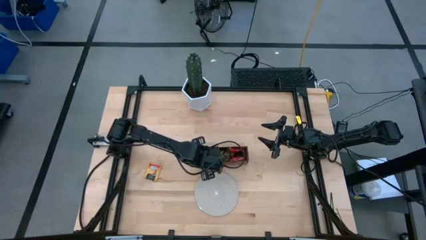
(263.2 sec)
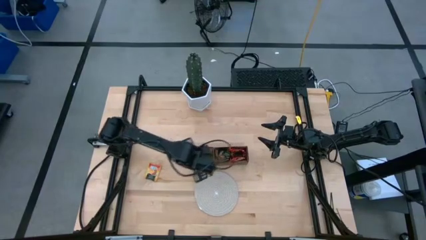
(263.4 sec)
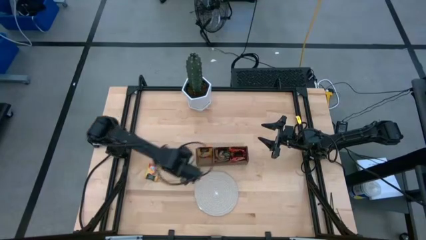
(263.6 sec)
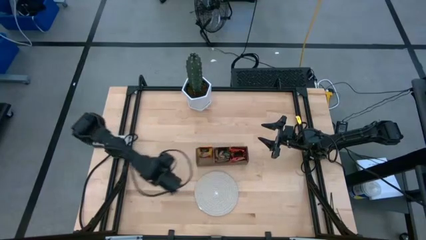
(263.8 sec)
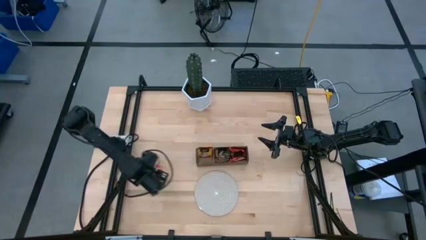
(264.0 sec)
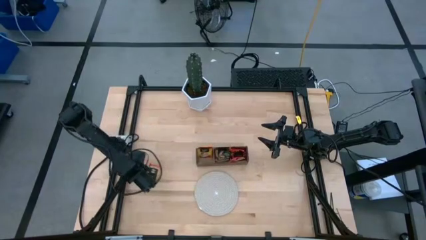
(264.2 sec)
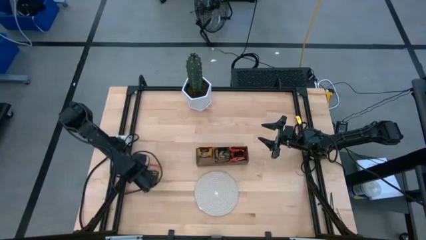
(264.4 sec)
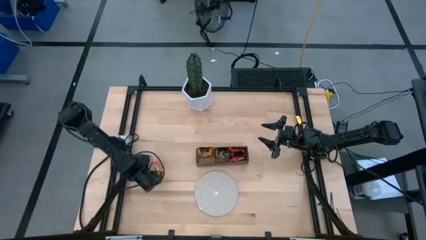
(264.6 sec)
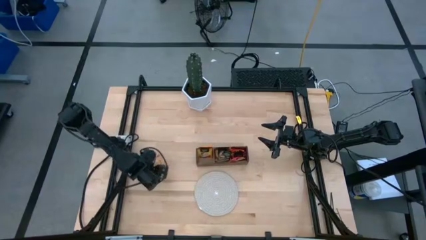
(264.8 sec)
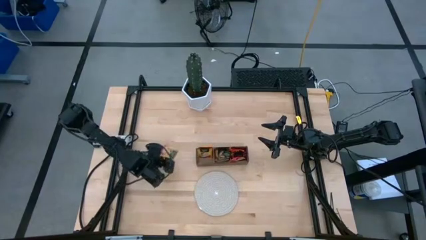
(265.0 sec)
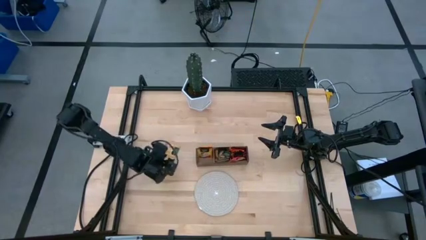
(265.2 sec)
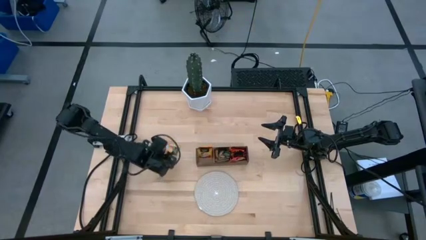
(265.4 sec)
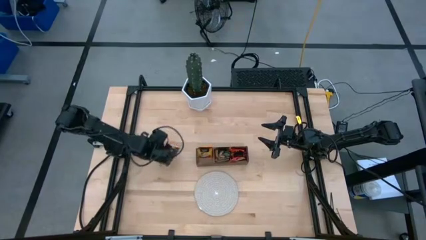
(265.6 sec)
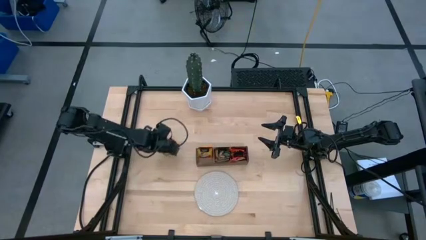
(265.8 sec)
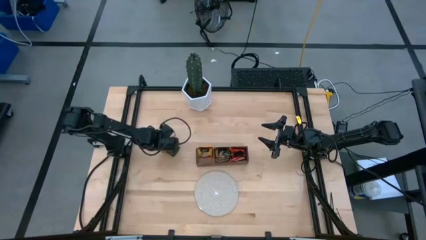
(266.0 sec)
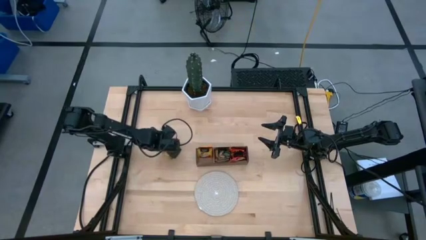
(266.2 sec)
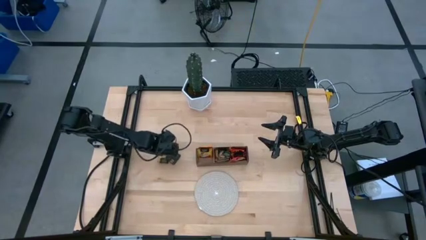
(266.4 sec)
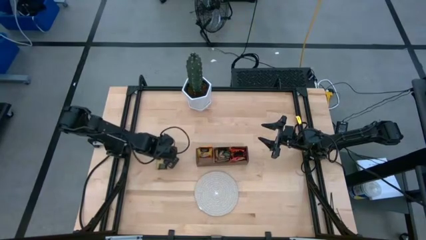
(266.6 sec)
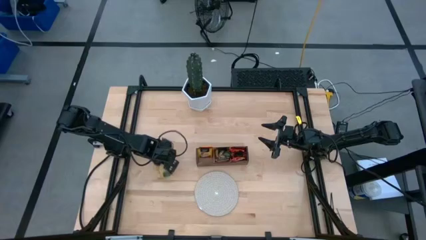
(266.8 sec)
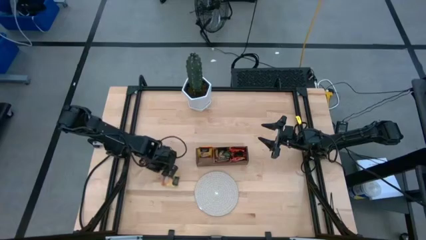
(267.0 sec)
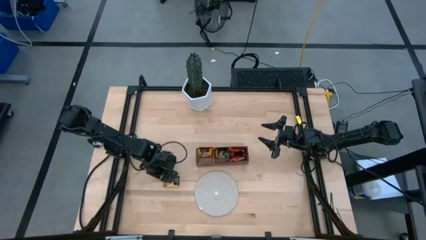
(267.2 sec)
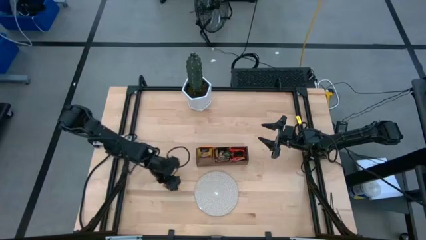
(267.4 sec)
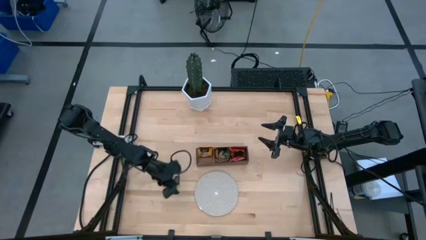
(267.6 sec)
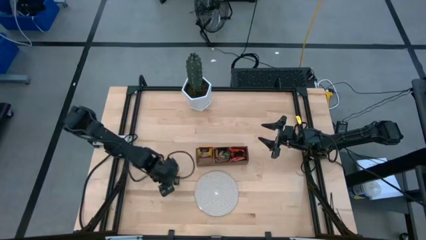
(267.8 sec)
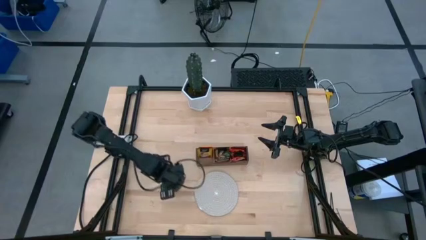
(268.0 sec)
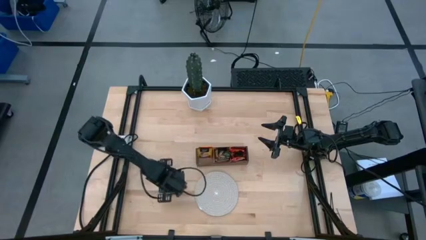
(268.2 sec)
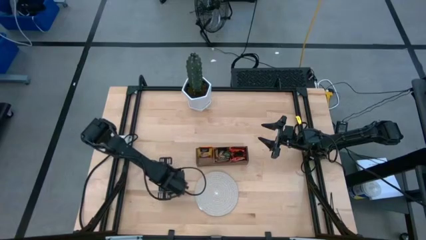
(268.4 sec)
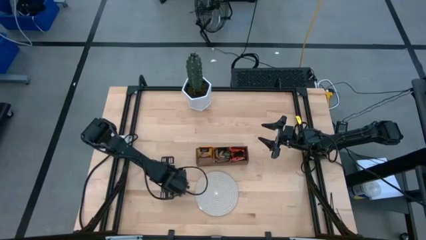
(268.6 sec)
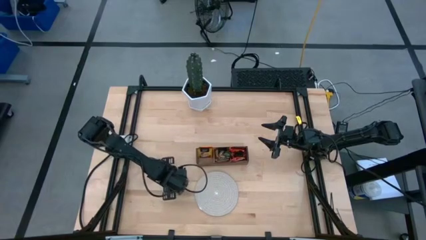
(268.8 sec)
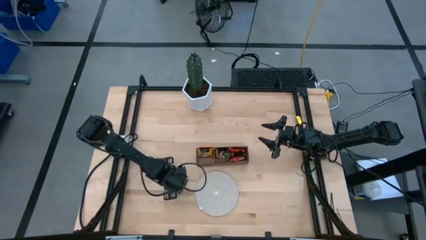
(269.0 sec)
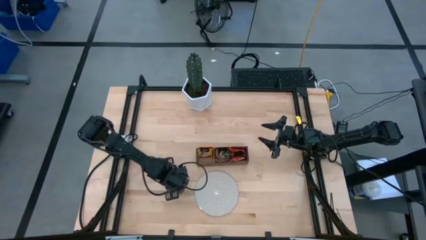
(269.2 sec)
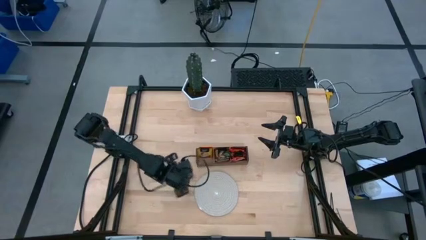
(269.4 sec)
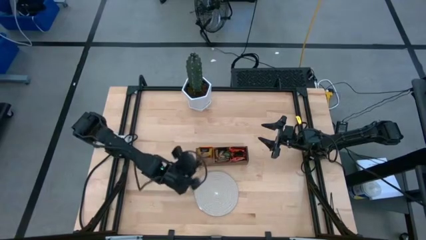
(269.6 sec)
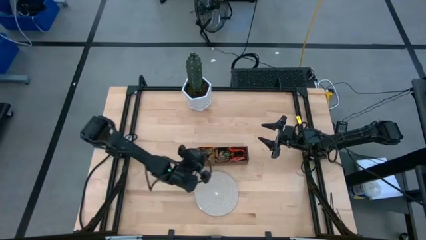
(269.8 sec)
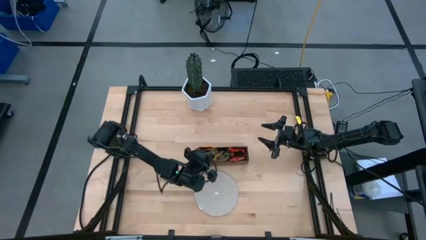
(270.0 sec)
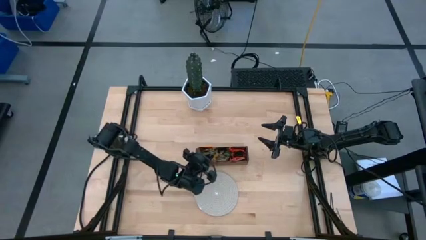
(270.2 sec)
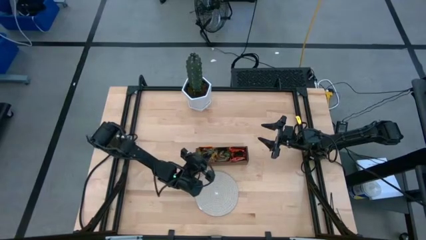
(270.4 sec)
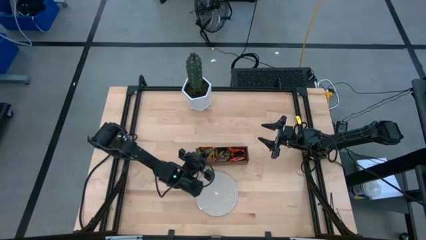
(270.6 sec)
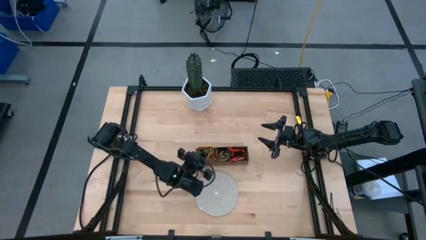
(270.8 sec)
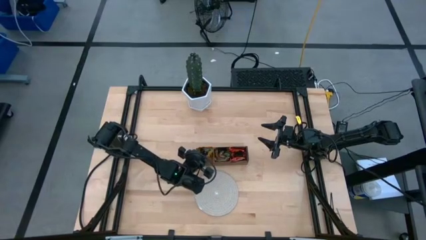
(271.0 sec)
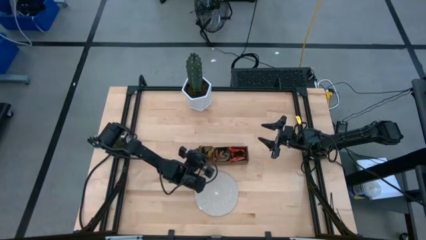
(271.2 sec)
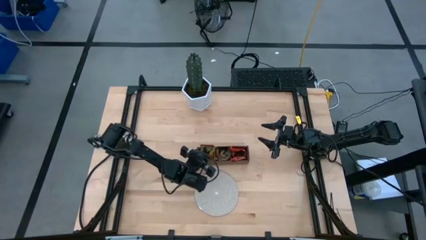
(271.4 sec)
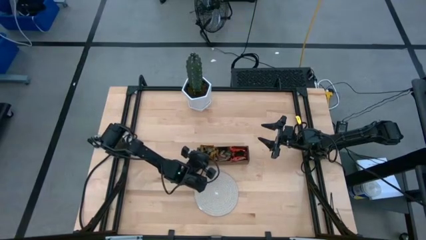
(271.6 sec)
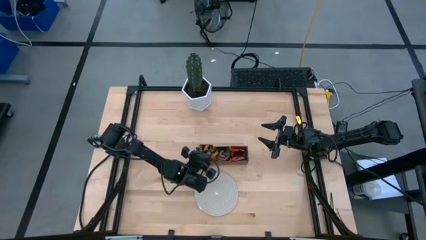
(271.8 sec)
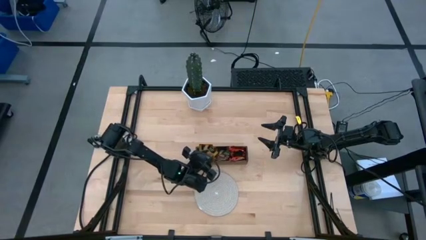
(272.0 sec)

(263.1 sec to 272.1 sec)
Task: Pick & Place Tea
Put the yellow tea bag into the left section of the wooden organizer

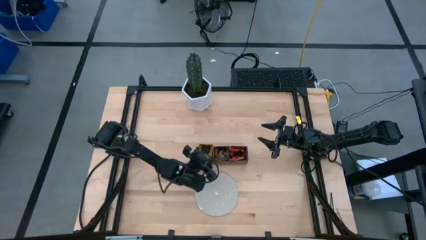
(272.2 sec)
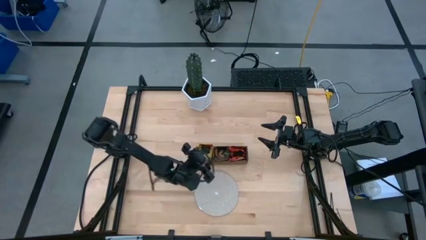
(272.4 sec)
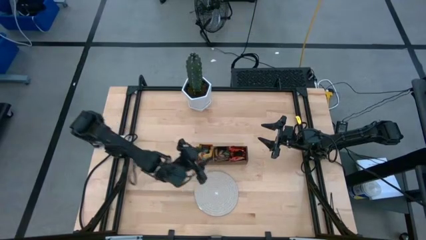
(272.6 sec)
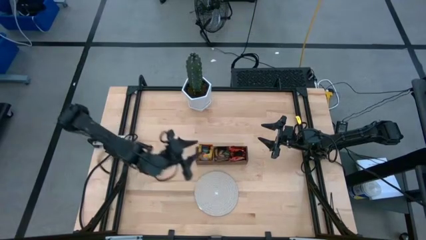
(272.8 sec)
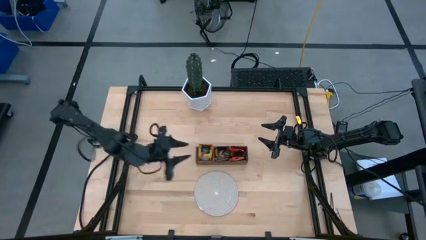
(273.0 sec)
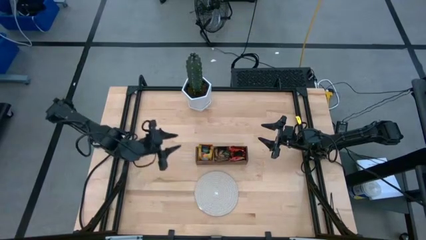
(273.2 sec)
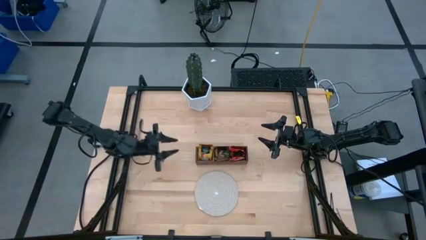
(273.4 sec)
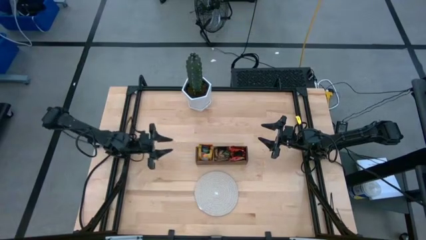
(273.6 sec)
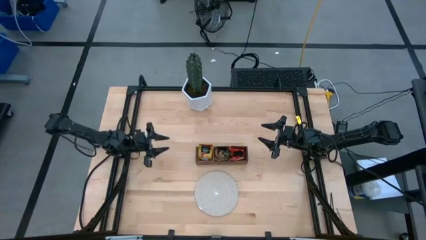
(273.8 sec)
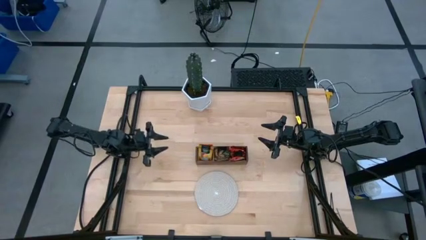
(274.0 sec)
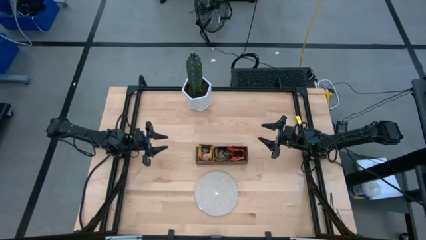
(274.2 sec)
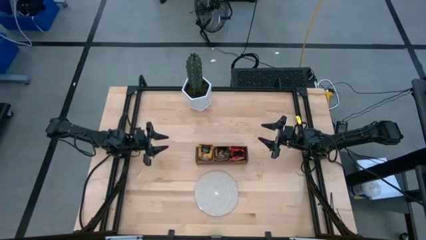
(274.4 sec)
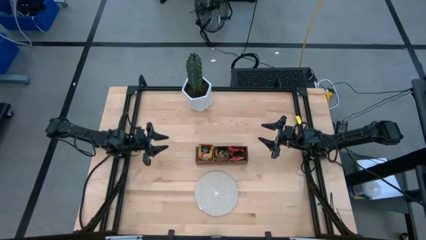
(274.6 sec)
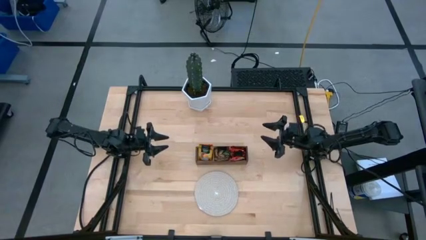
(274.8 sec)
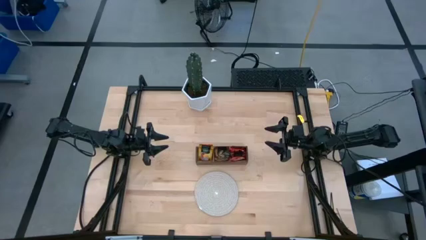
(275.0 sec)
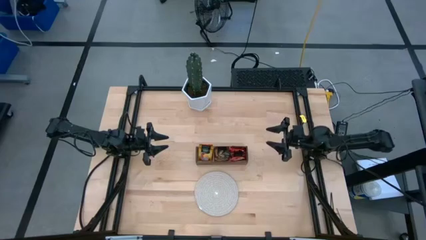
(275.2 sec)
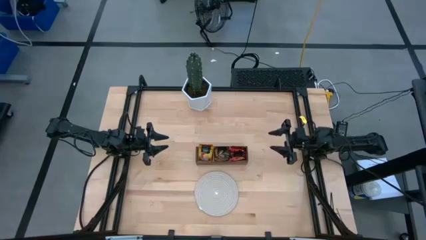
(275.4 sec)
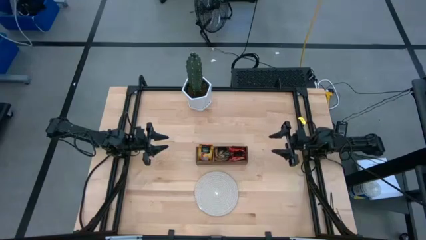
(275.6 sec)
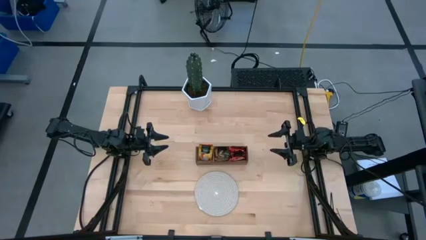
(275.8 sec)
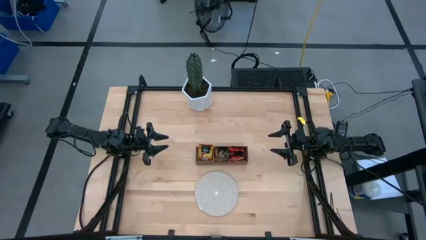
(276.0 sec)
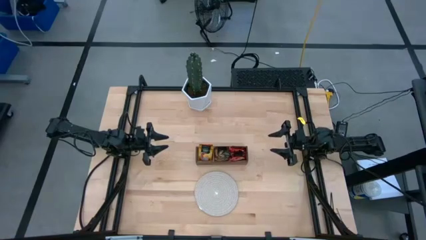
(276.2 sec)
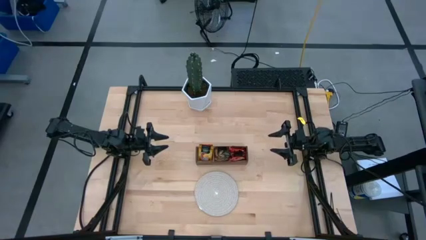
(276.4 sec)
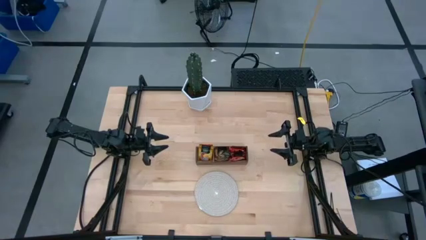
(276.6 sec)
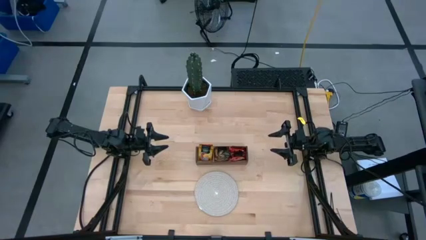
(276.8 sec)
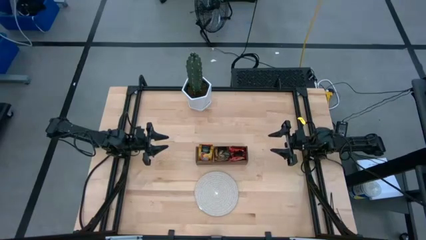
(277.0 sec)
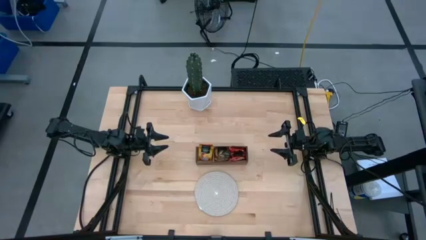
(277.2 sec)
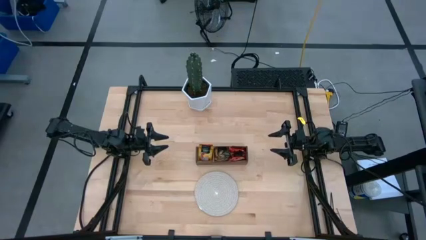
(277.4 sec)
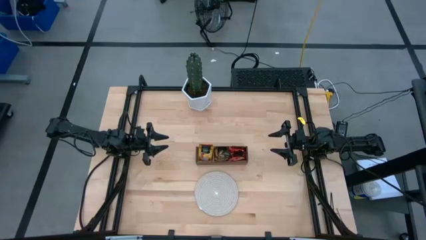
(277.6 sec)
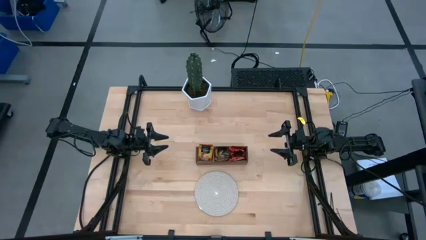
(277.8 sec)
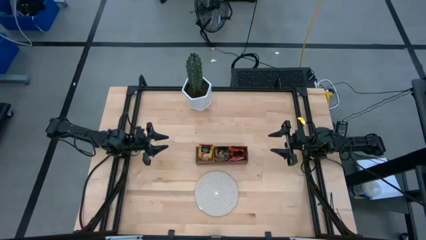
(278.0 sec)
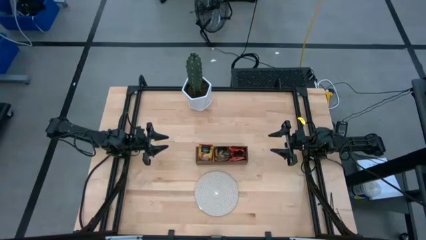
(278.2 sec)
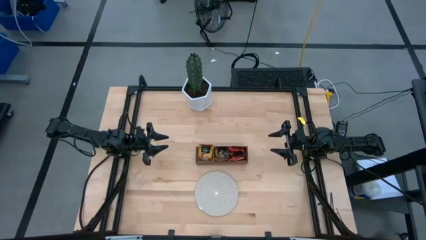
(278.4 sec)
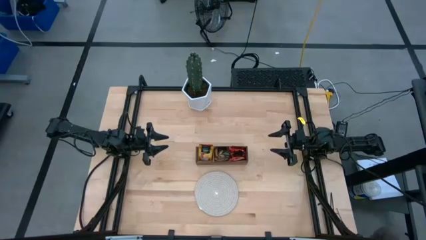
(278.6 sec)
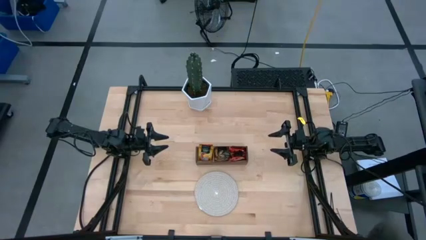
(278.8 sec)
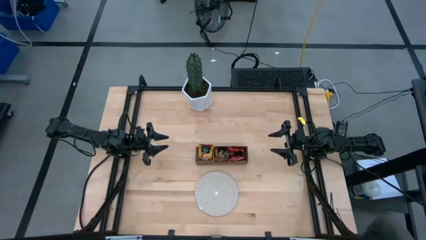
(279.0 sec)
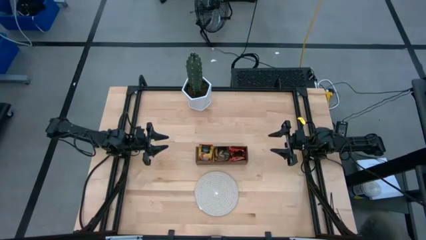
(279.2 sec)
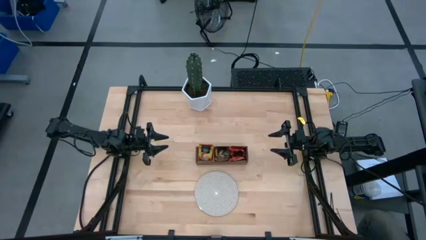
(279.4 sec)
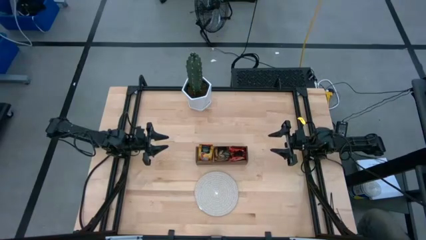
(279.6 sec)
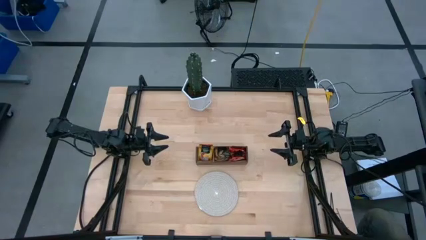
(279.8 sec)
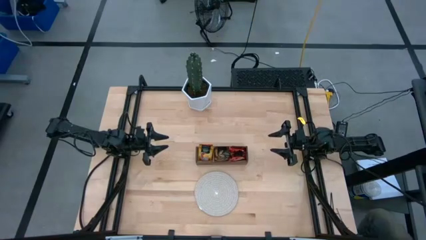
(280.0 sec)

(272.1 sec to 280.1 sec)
Return to Home Position

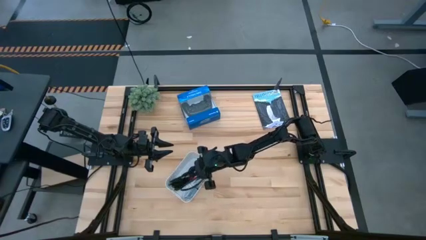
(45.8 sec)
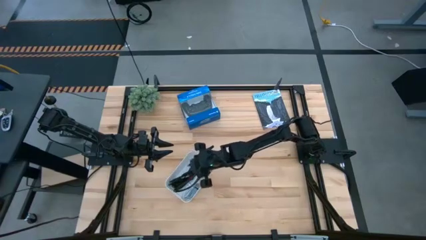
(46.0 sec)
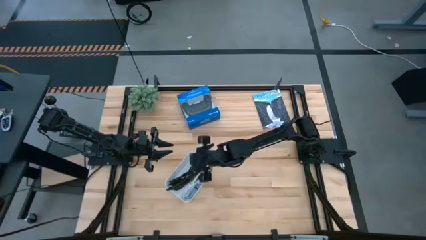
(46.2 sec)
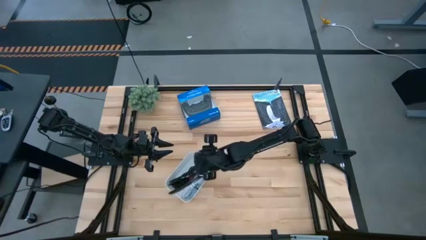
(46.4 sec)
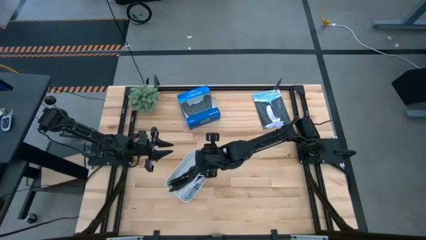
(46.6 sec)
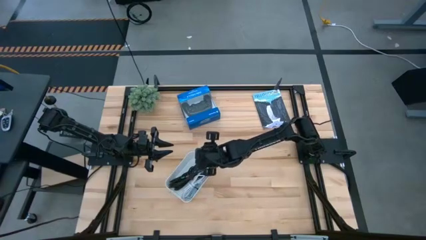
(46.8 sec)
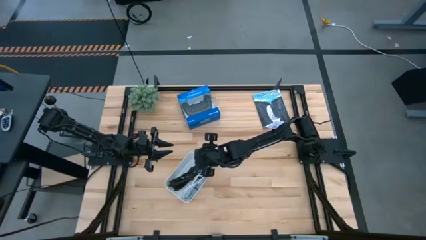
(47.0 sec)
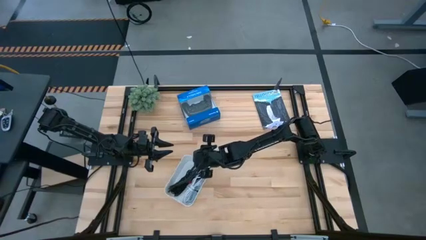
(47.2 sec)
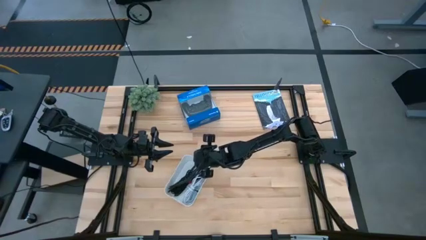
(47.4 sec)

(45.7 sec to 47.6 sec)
Task: Pick and place USB-C Cables
Adjust the white bin
